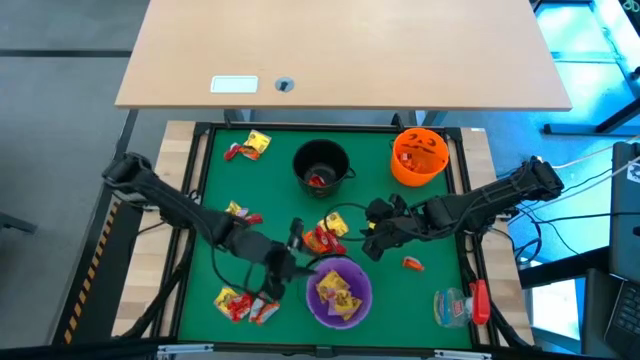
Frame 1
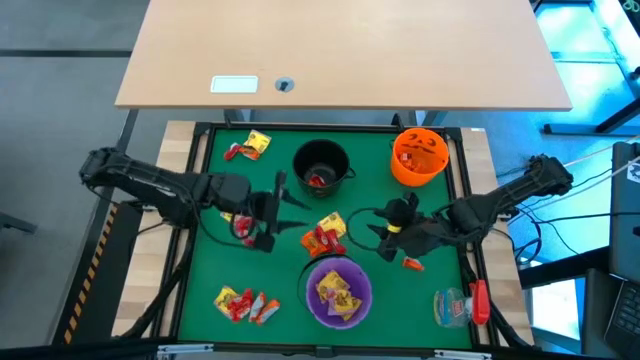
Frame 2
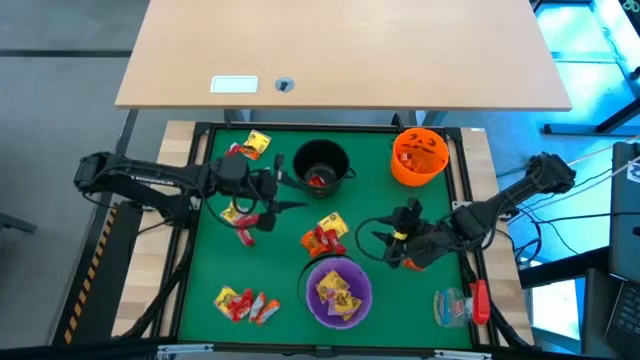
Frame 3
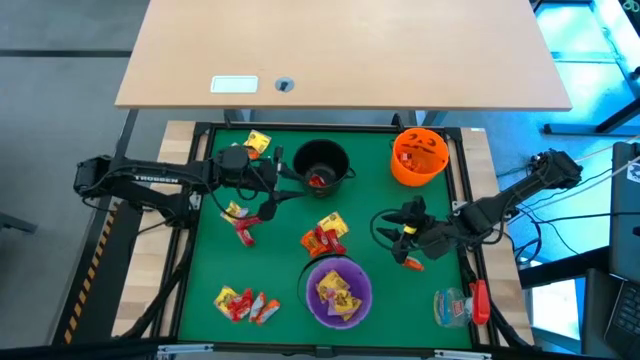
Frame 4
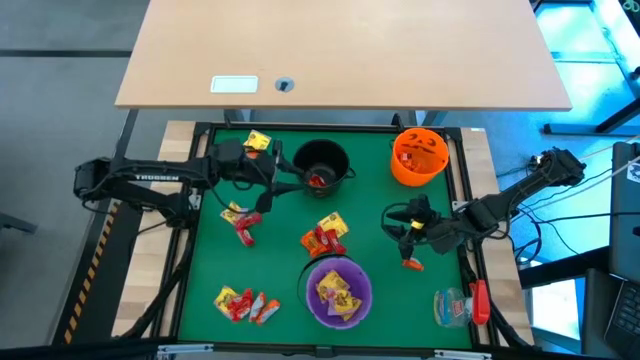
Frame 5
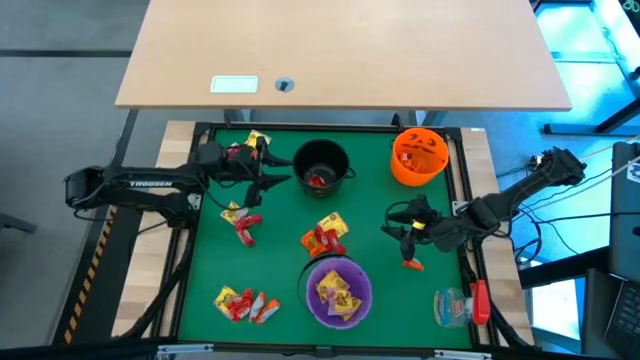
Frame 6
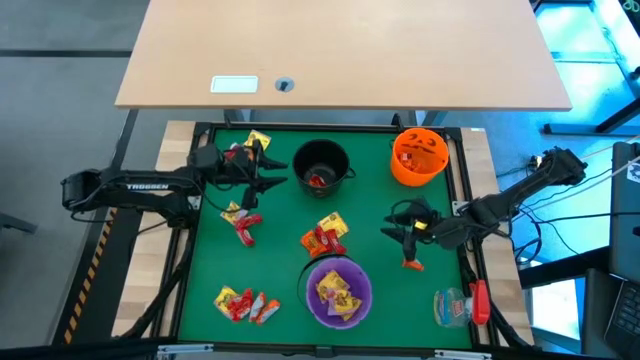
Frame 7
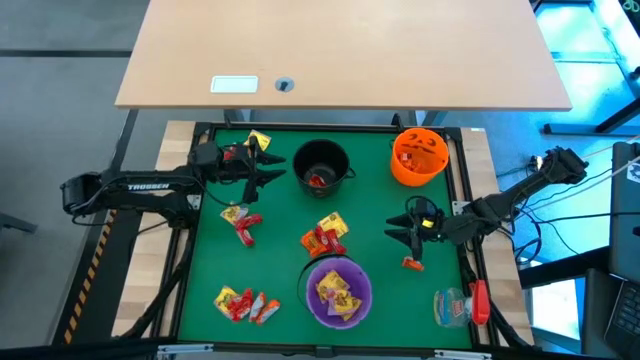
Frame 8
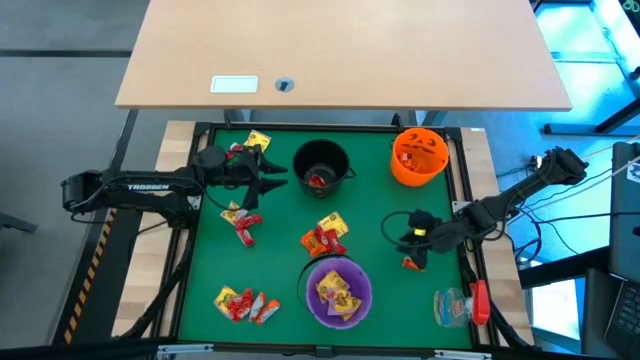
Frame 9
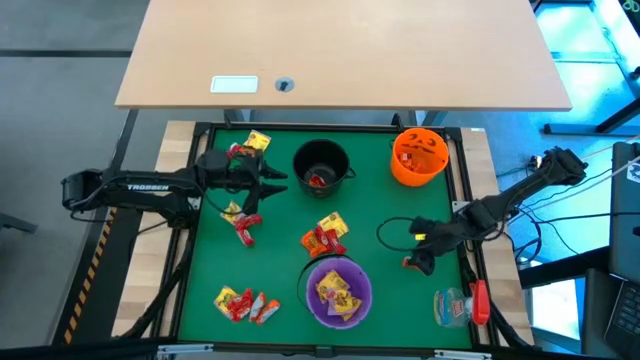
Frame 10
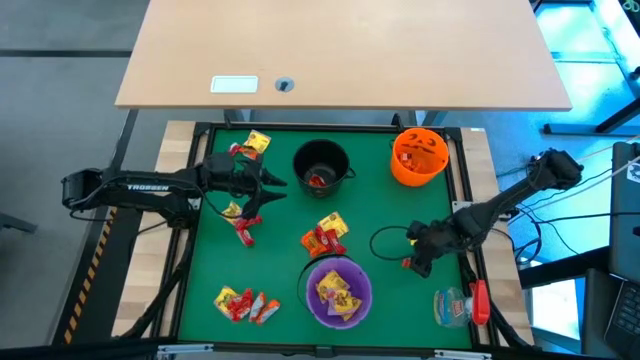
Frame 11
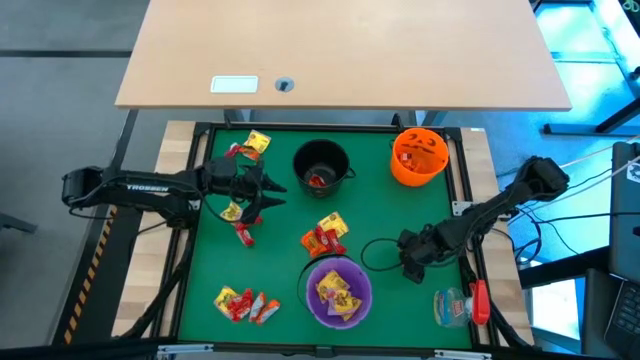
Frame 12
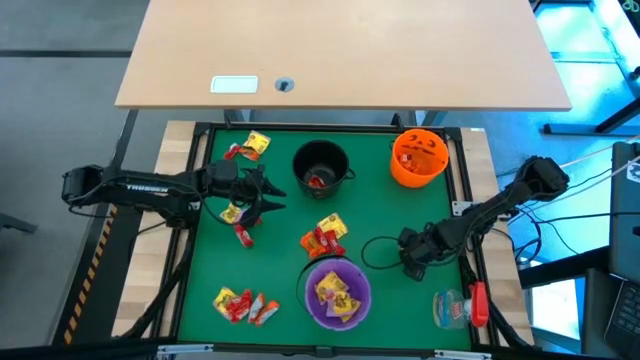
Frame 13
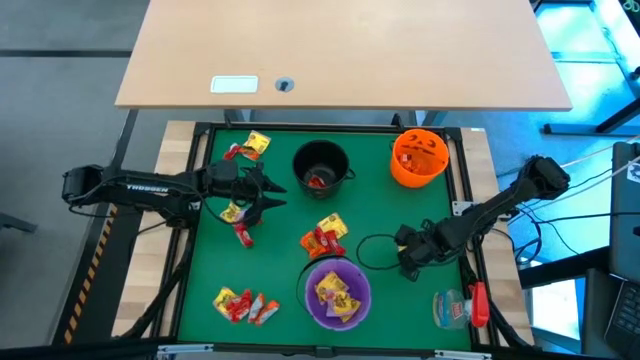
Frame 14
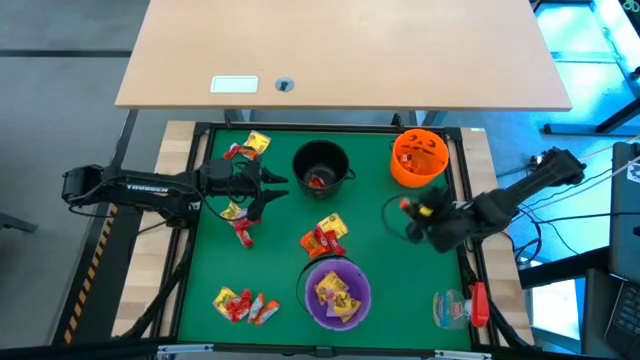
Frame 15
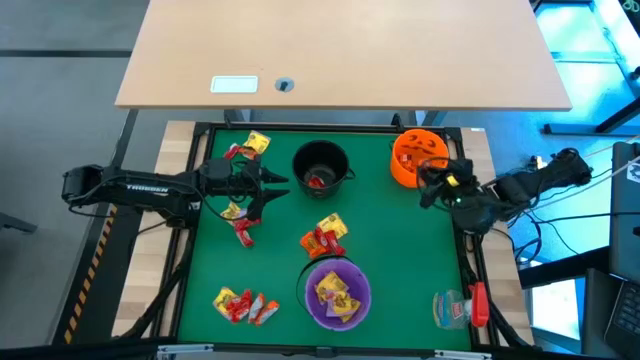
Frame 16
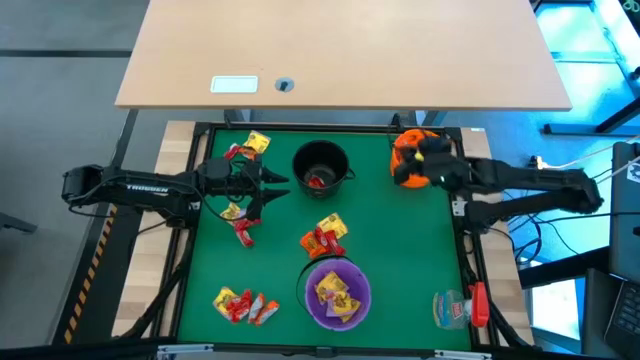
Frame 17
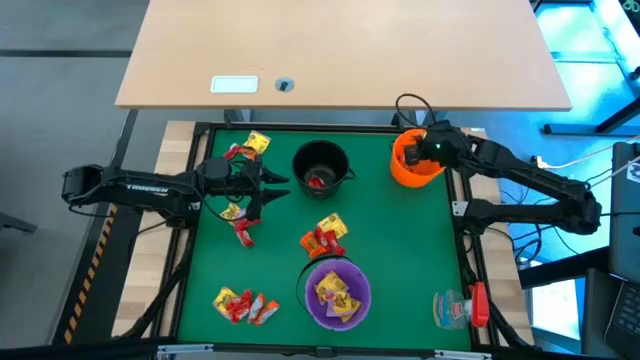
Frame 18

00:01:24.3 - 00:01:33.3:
Task: Sort candy
Put the orange candy into the orange bucket

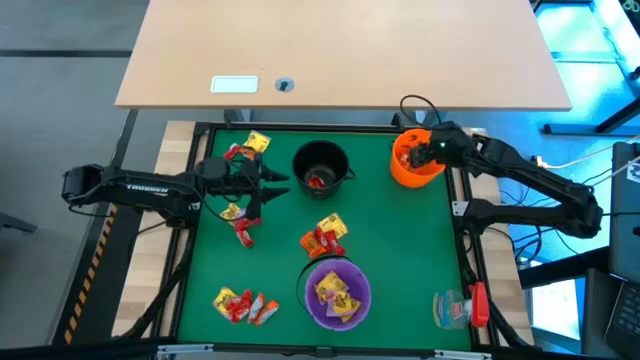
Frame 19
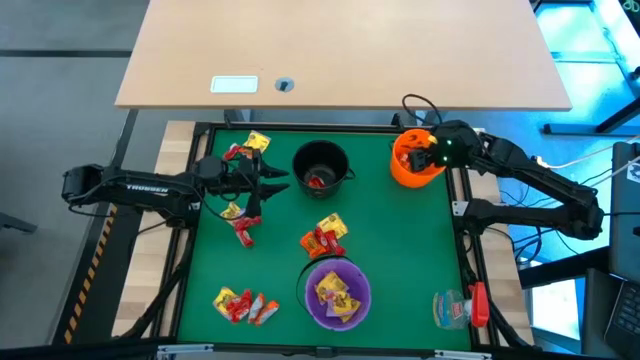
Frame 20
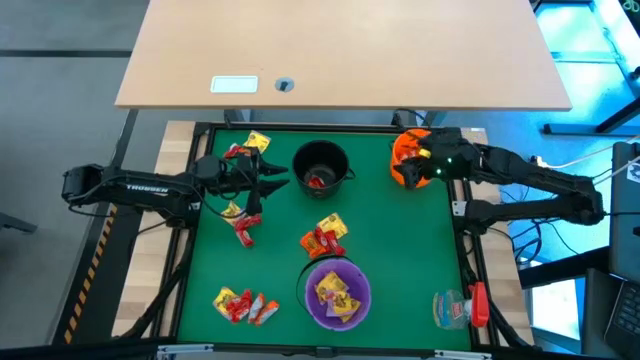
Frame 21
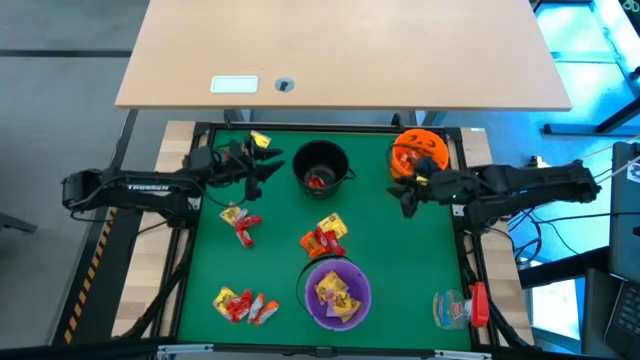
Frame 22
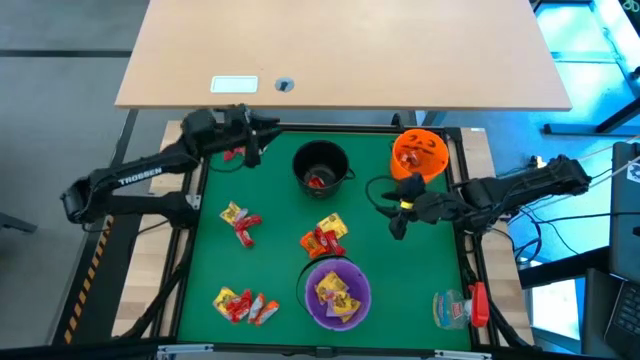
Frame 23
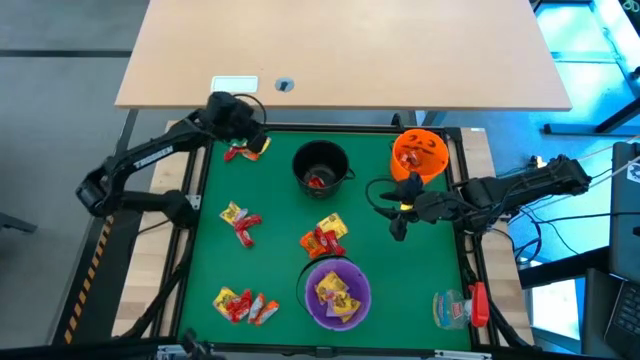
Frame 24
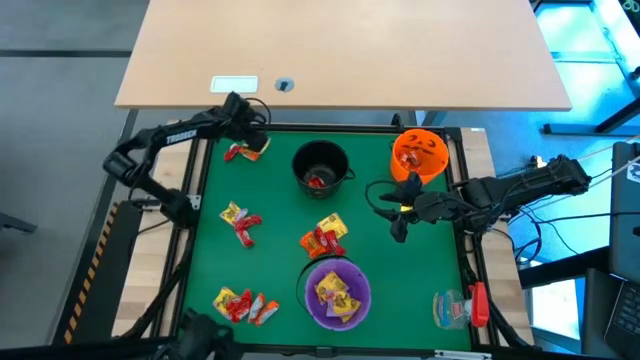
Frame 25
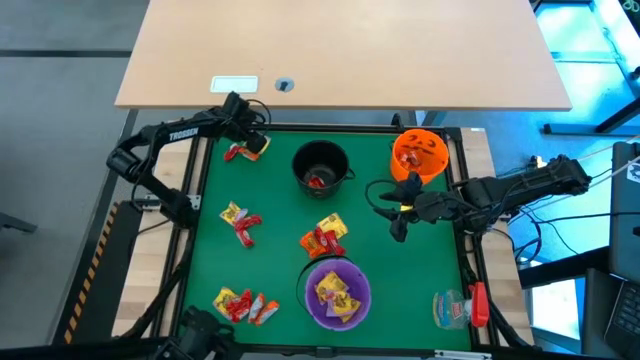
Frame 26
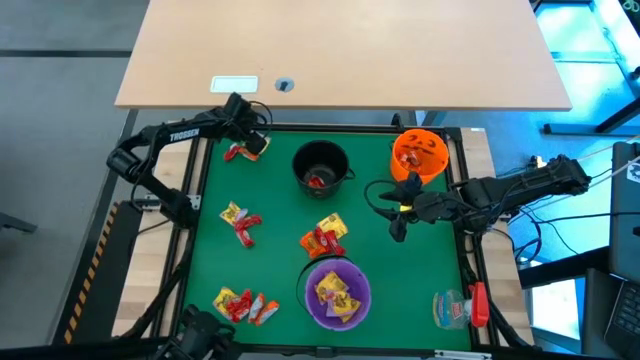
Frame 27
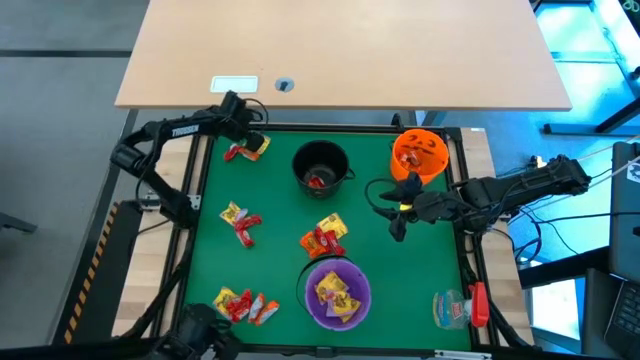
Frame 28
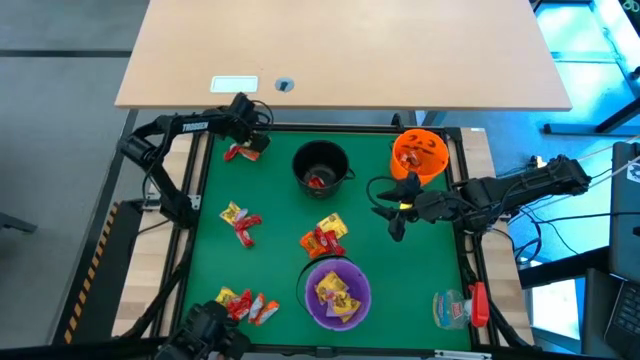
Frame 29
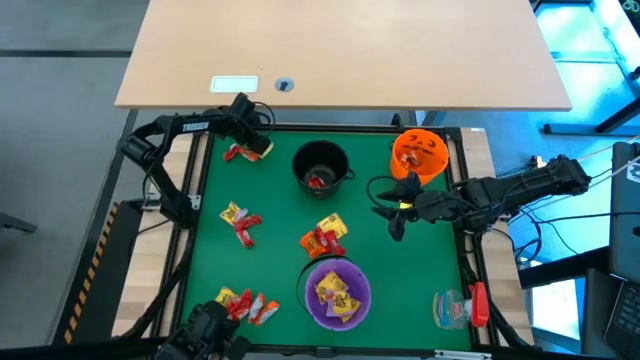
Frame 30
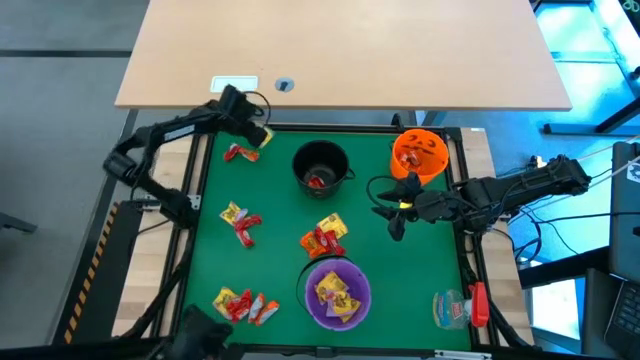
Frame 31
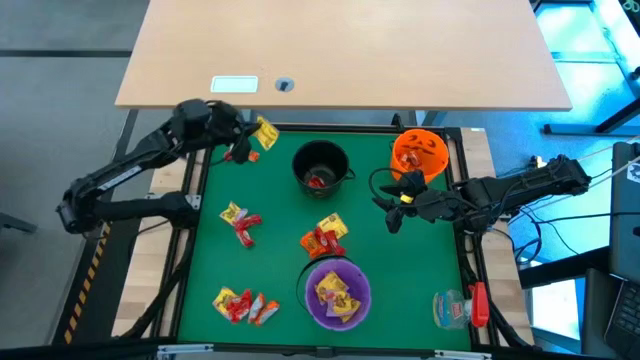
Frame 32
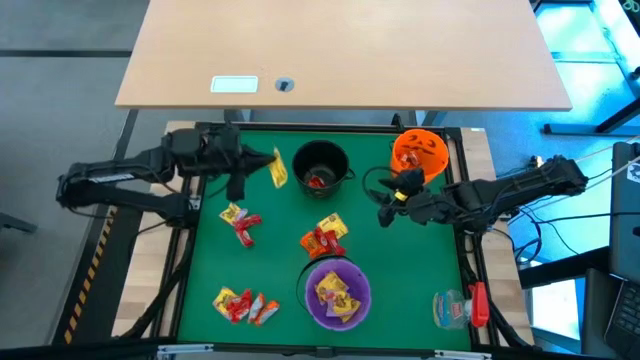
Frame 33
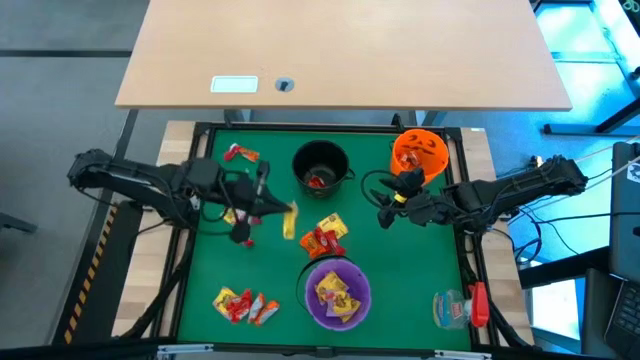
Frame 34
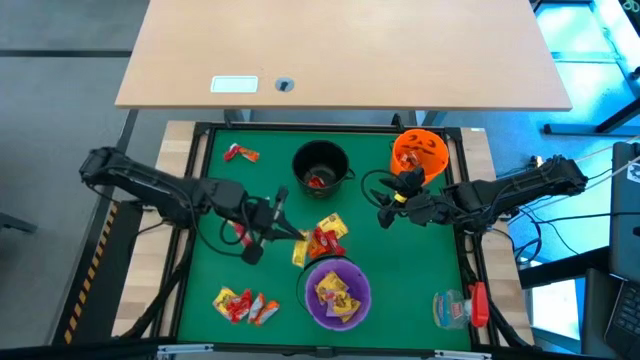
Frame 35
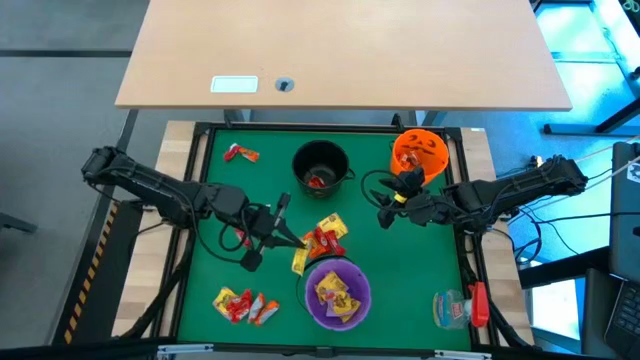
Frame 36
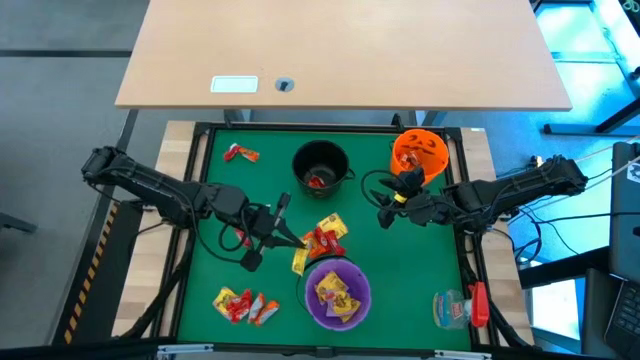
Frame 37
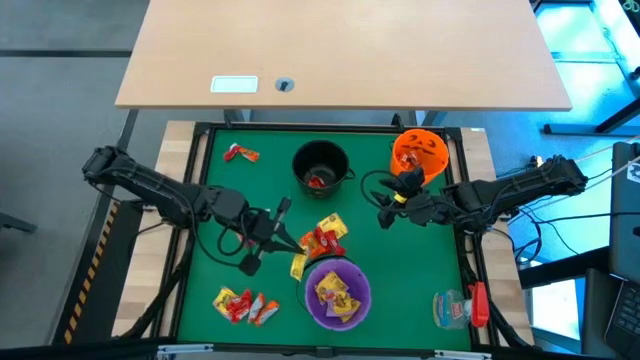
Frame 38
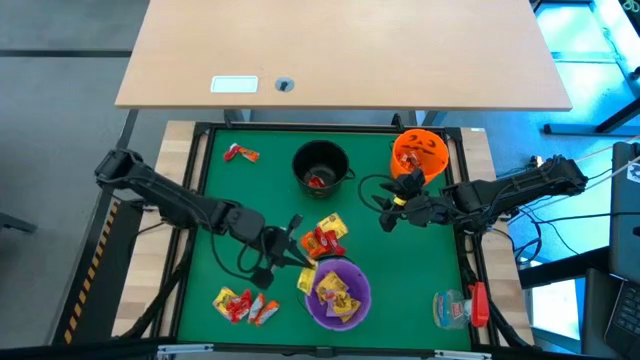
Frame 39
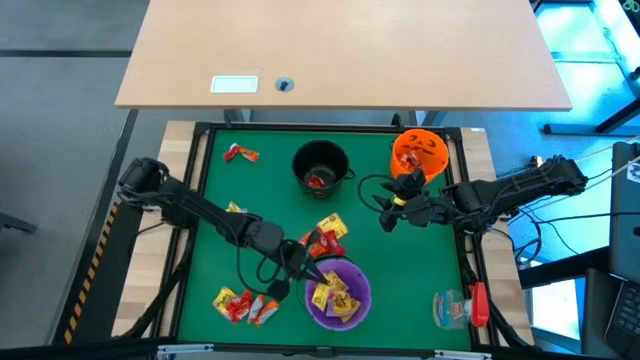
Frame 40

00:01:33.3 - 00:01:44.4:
Put the yellow candy into the purple bucket

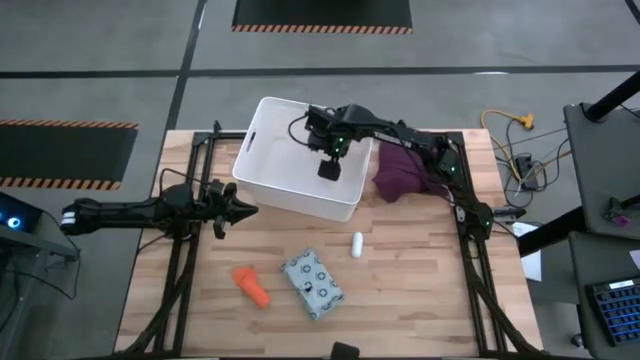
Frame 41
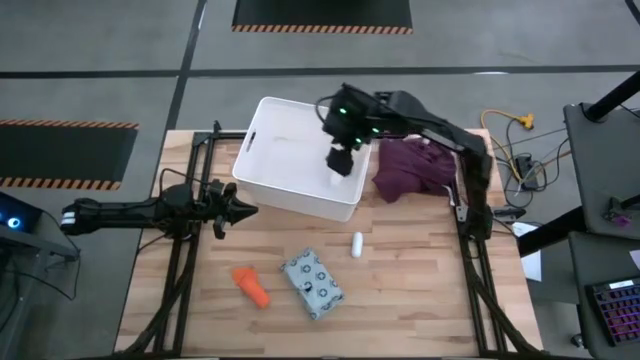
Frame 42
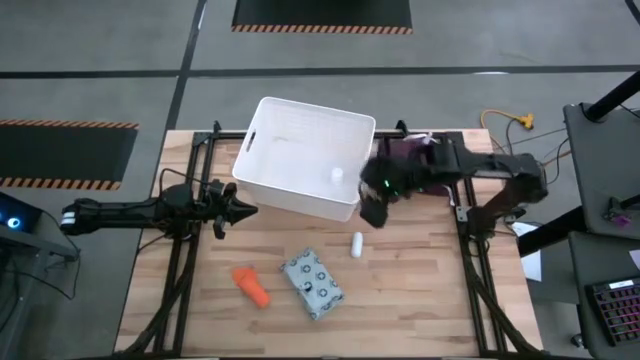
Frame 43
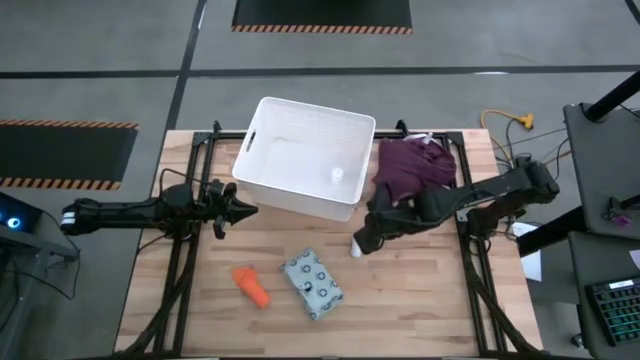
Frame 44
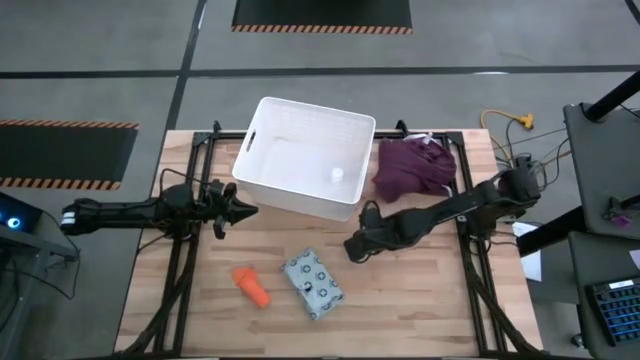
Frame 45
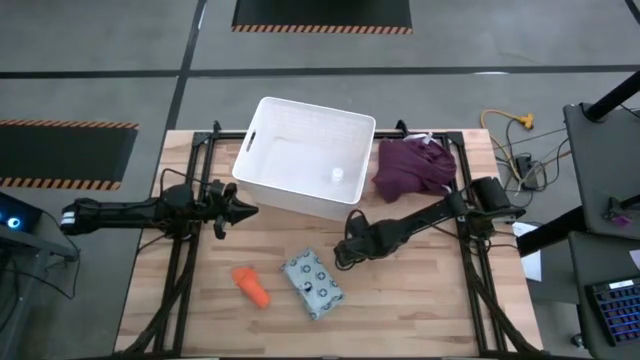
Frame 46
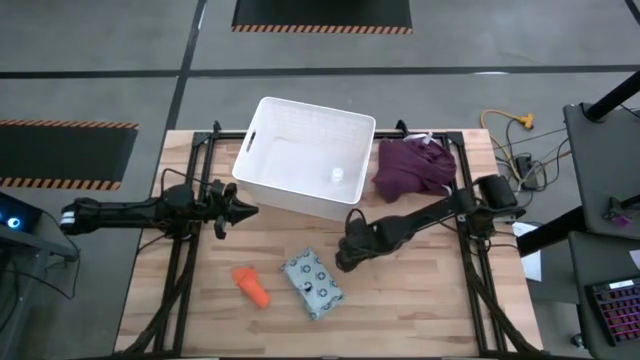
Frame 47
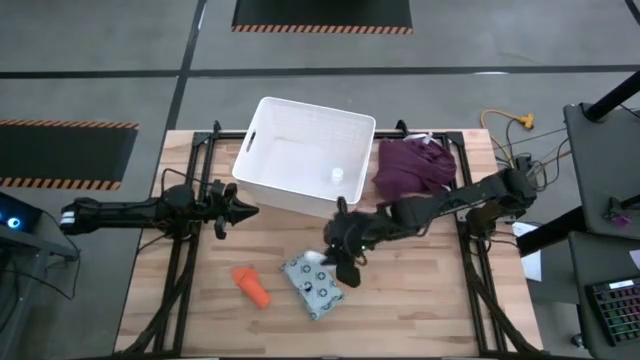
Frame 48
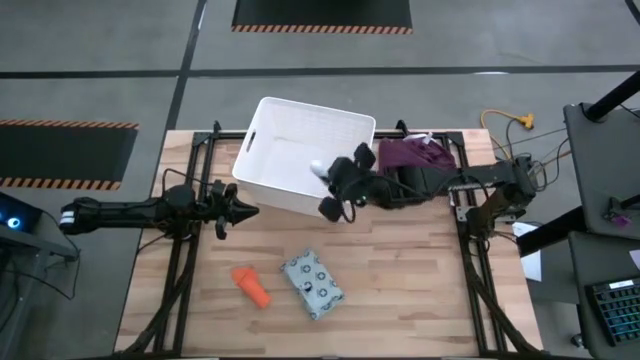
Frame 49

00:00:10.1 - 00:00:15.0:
Task: Pick & place medical supplies in basket/bin
Put the white bandage into the bin
